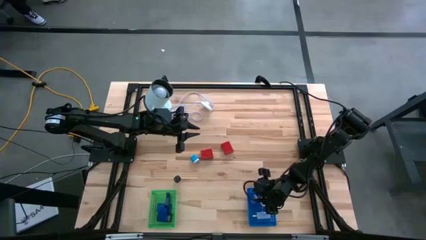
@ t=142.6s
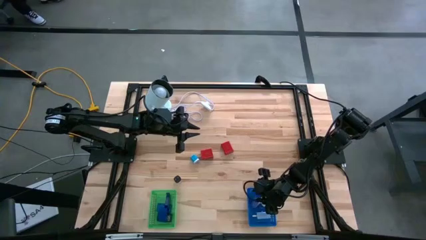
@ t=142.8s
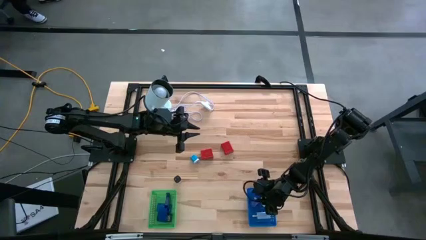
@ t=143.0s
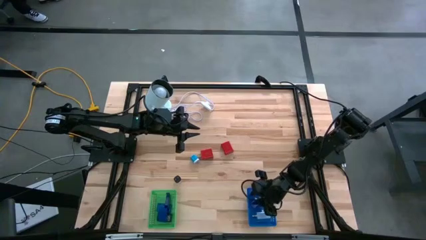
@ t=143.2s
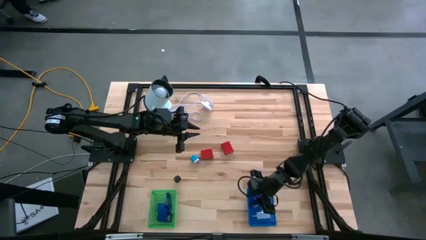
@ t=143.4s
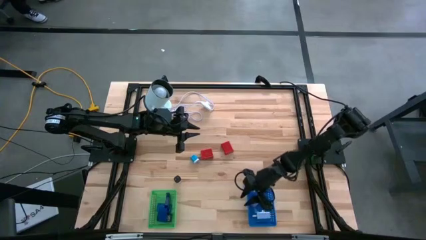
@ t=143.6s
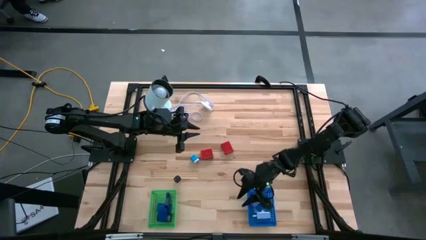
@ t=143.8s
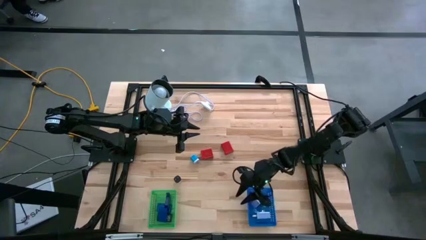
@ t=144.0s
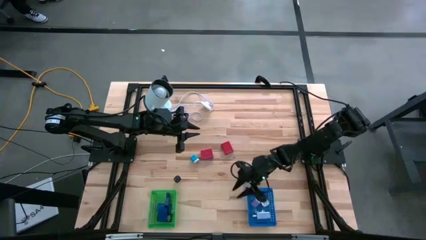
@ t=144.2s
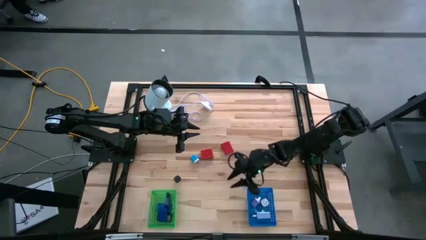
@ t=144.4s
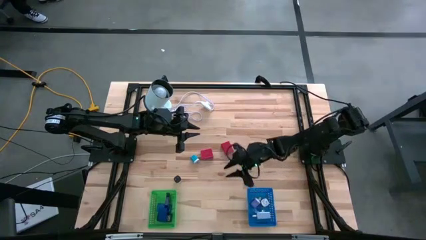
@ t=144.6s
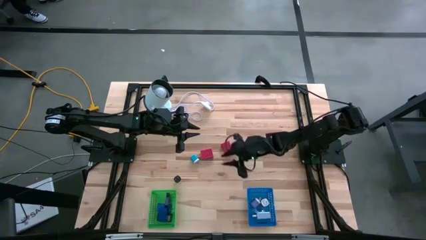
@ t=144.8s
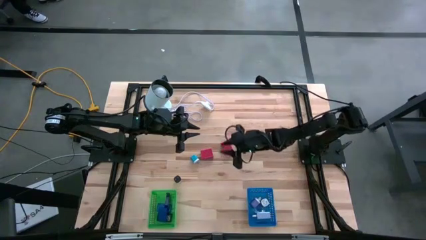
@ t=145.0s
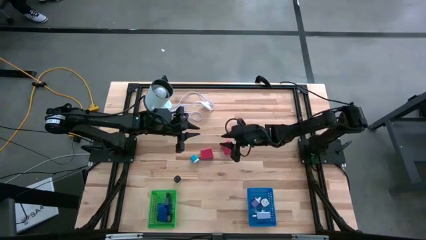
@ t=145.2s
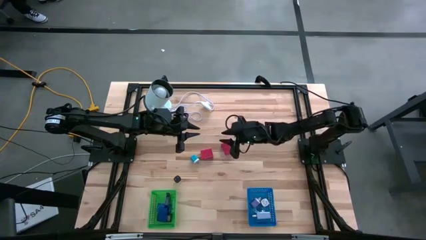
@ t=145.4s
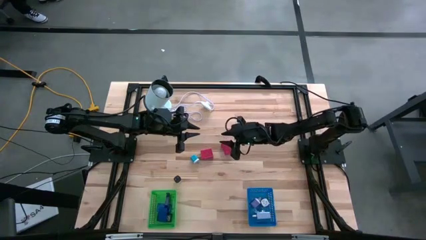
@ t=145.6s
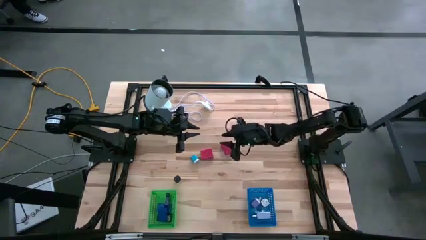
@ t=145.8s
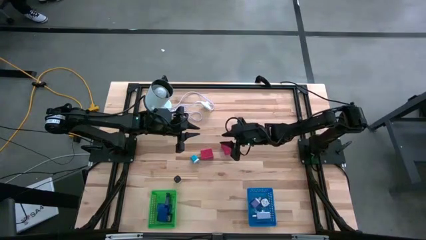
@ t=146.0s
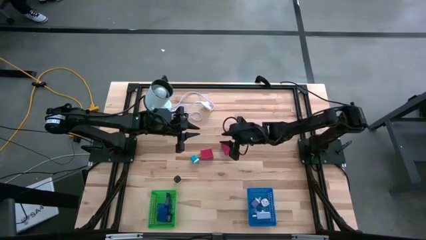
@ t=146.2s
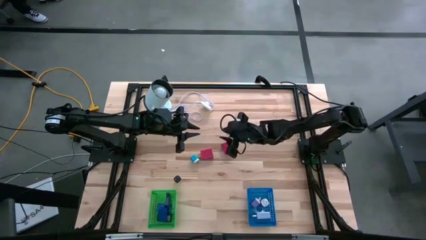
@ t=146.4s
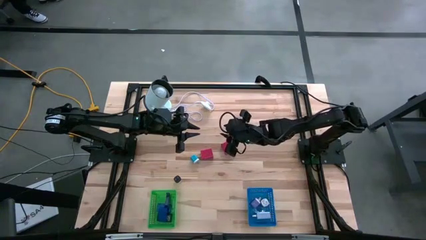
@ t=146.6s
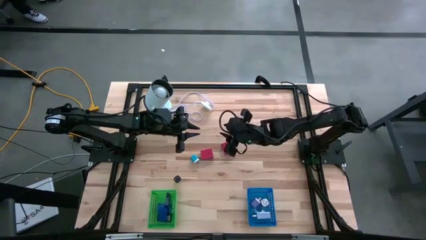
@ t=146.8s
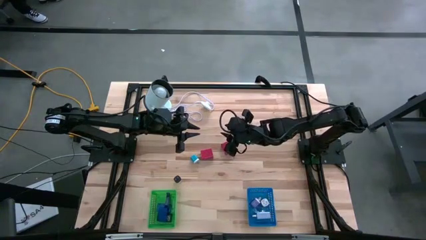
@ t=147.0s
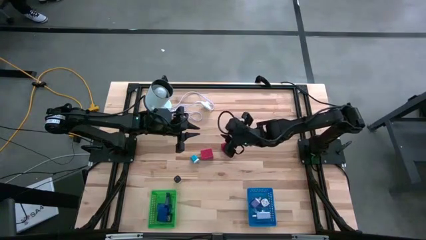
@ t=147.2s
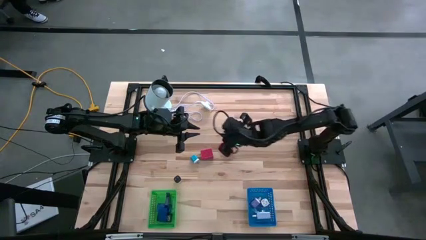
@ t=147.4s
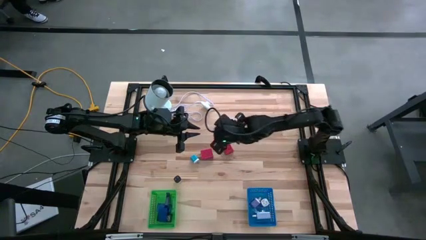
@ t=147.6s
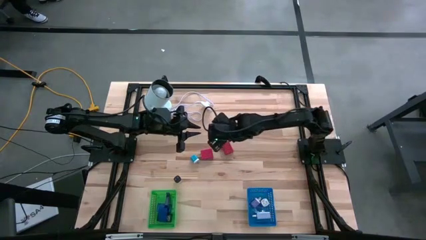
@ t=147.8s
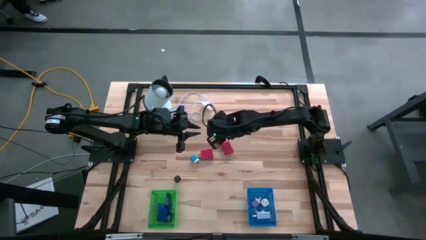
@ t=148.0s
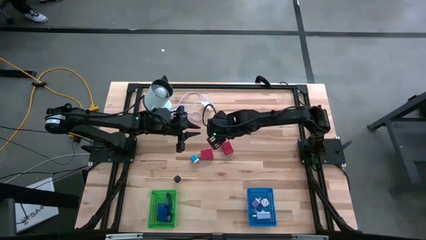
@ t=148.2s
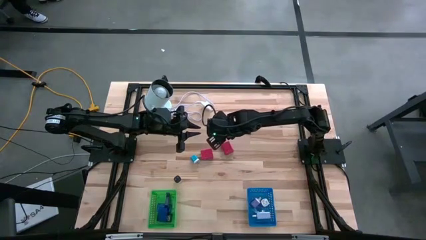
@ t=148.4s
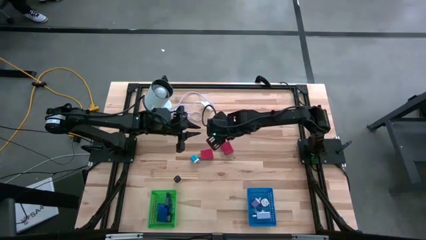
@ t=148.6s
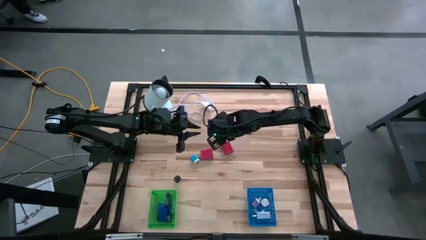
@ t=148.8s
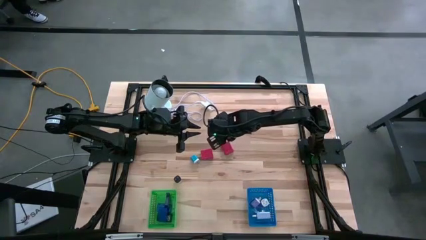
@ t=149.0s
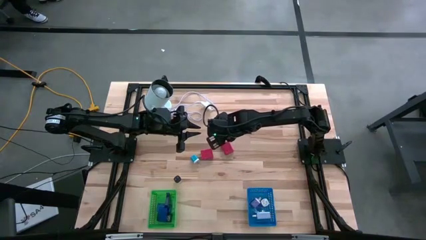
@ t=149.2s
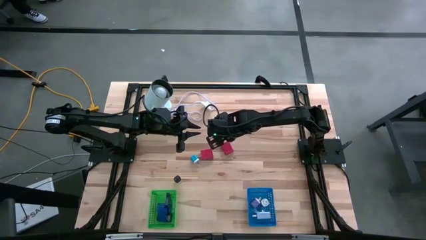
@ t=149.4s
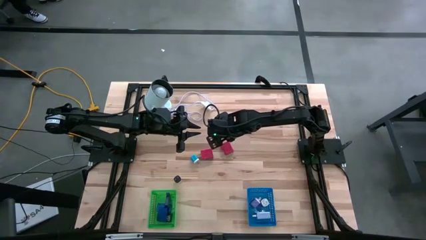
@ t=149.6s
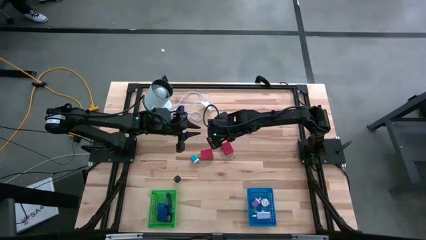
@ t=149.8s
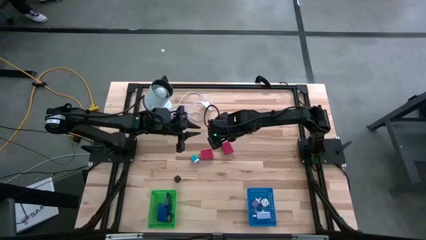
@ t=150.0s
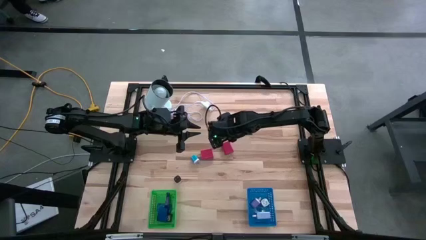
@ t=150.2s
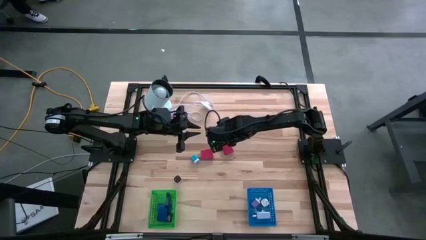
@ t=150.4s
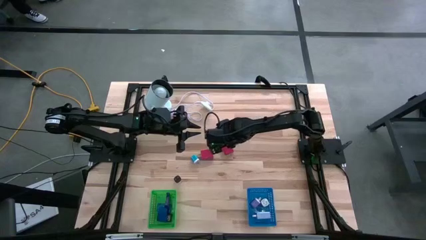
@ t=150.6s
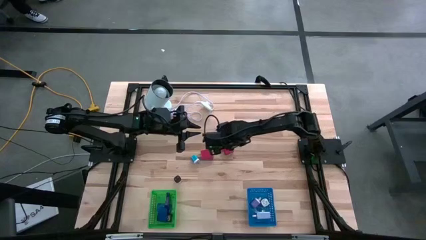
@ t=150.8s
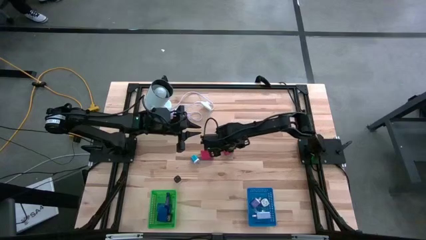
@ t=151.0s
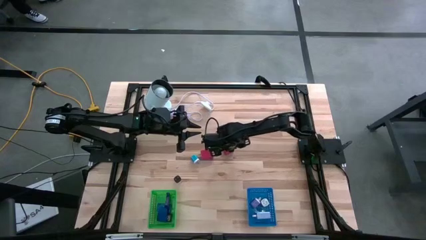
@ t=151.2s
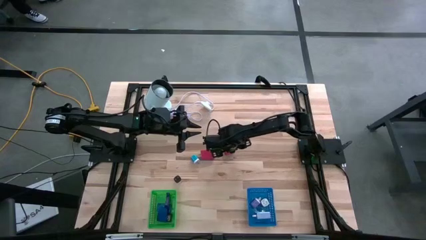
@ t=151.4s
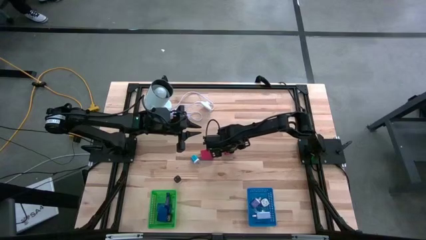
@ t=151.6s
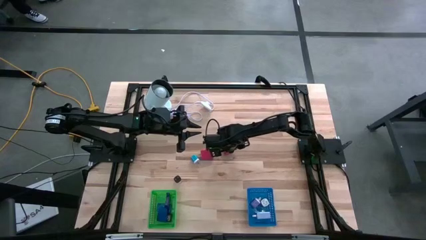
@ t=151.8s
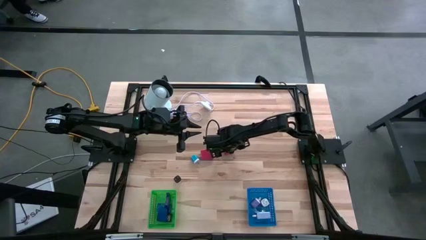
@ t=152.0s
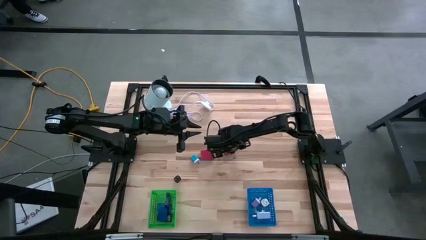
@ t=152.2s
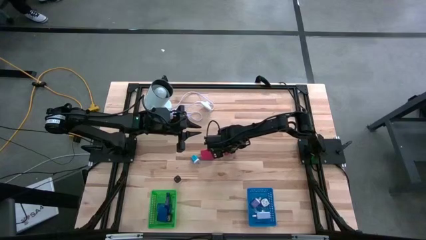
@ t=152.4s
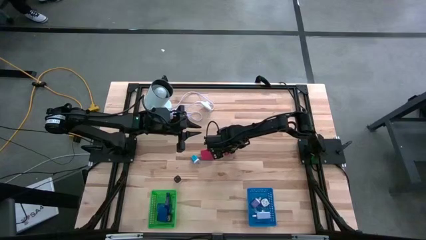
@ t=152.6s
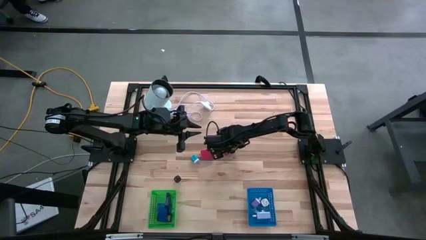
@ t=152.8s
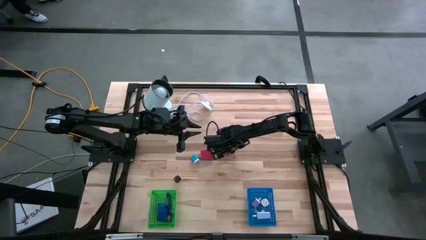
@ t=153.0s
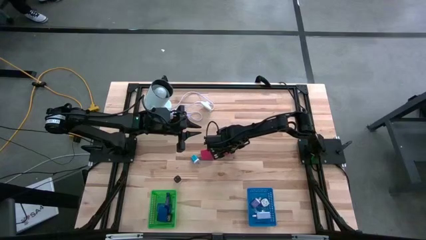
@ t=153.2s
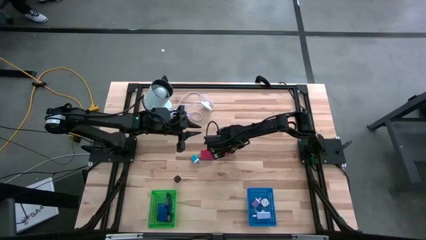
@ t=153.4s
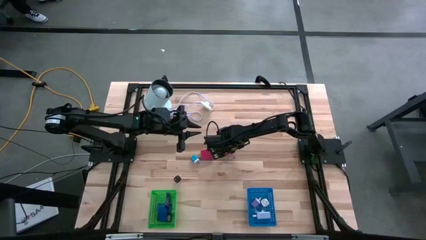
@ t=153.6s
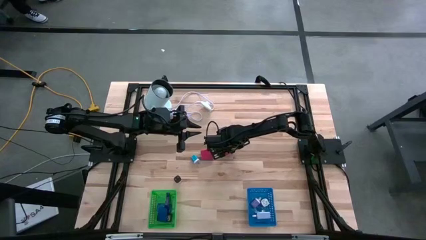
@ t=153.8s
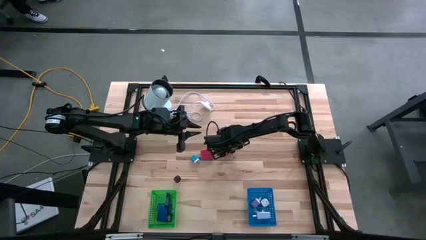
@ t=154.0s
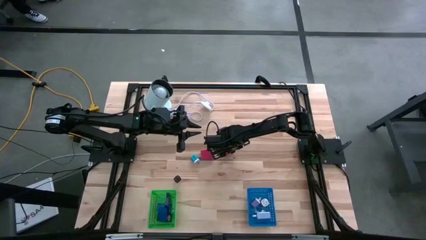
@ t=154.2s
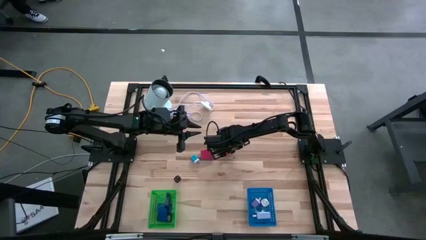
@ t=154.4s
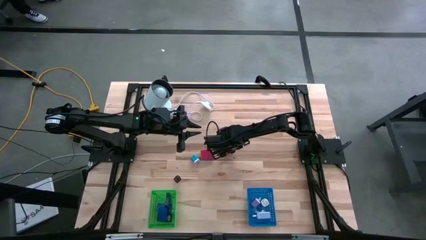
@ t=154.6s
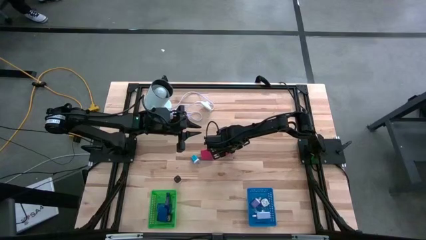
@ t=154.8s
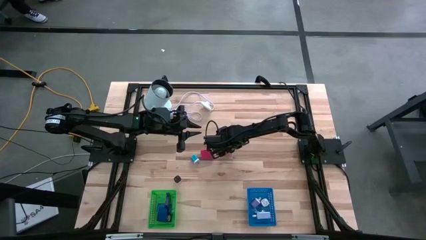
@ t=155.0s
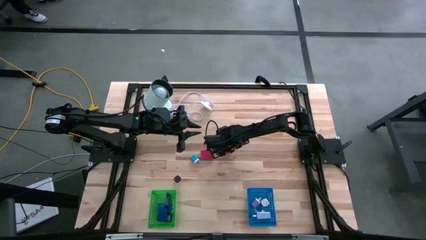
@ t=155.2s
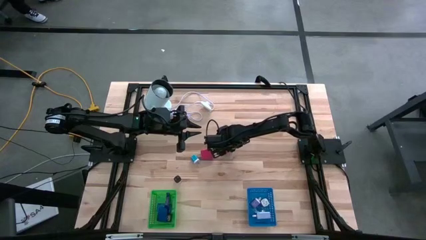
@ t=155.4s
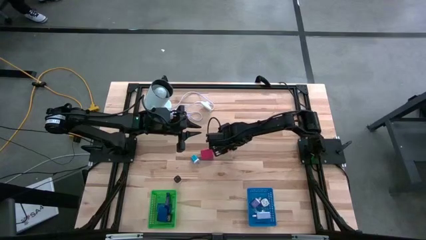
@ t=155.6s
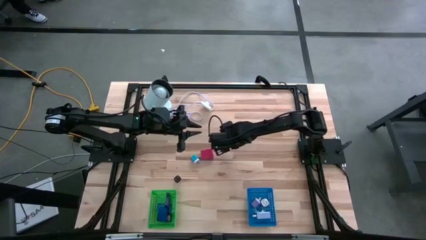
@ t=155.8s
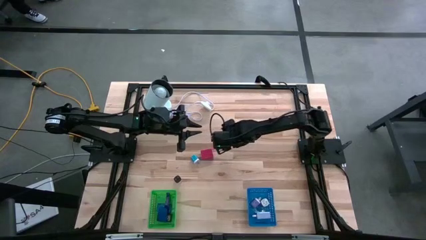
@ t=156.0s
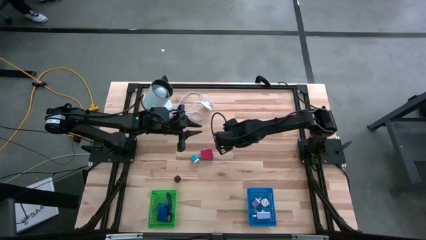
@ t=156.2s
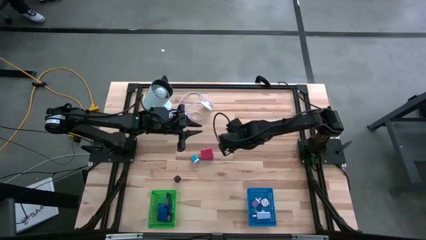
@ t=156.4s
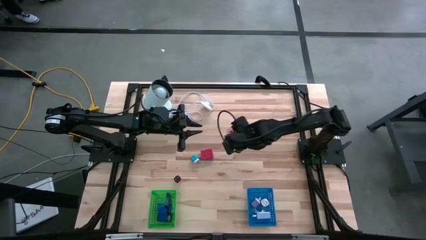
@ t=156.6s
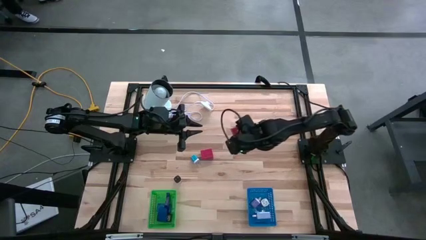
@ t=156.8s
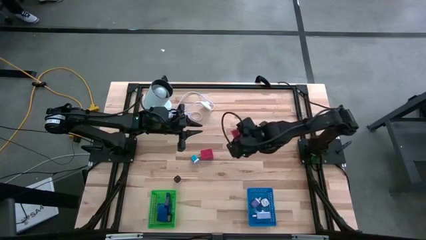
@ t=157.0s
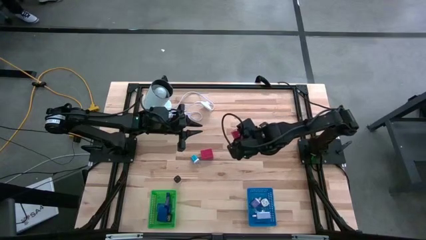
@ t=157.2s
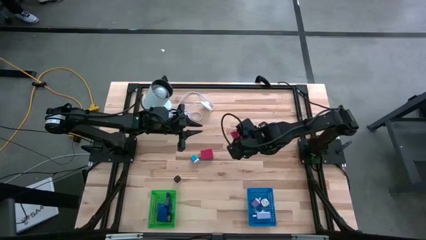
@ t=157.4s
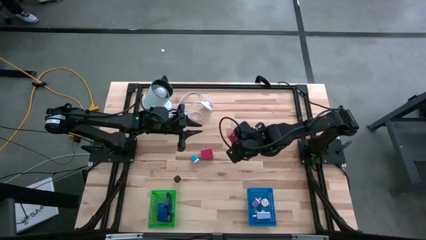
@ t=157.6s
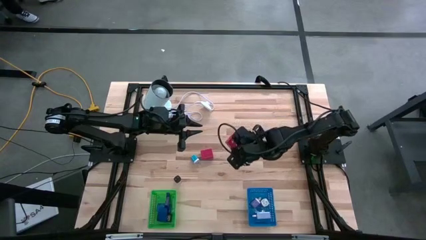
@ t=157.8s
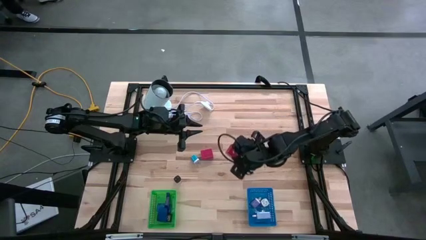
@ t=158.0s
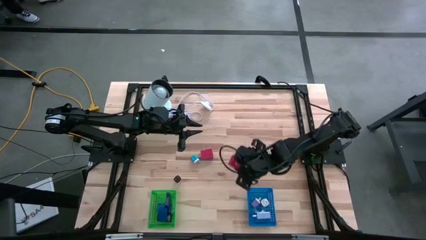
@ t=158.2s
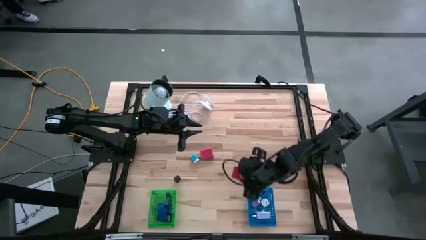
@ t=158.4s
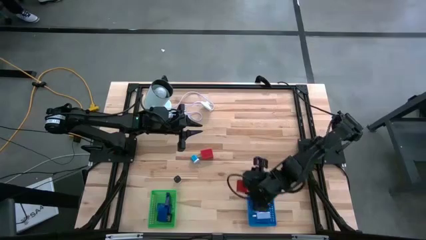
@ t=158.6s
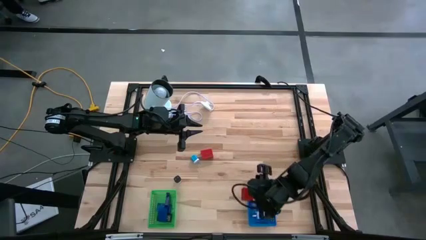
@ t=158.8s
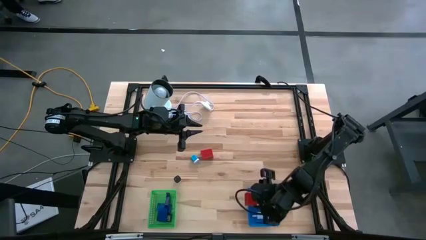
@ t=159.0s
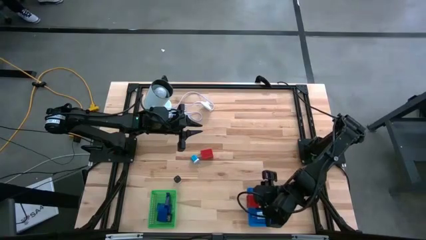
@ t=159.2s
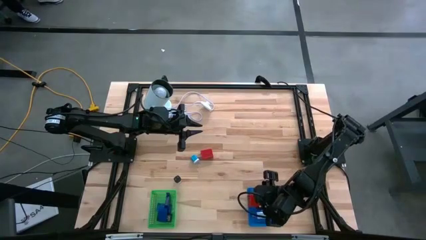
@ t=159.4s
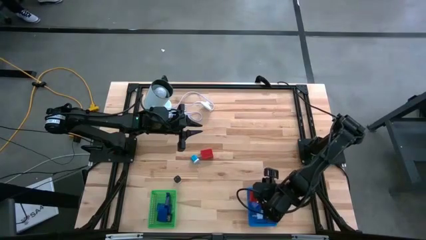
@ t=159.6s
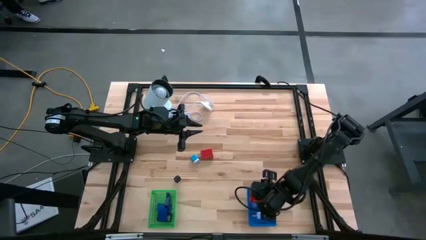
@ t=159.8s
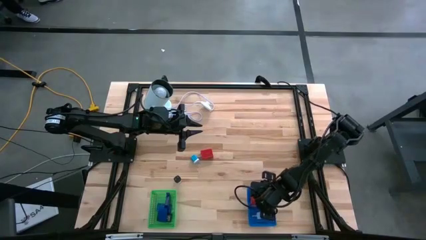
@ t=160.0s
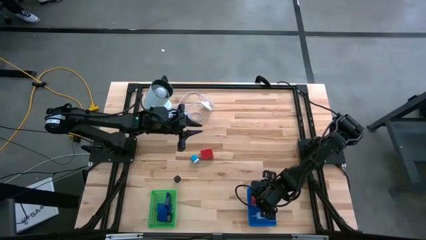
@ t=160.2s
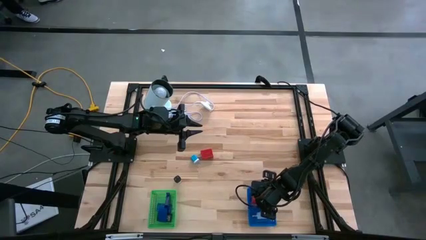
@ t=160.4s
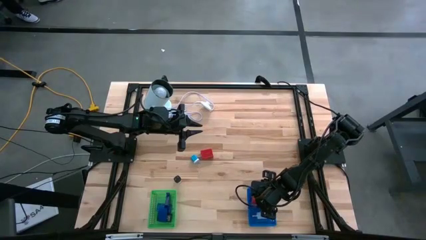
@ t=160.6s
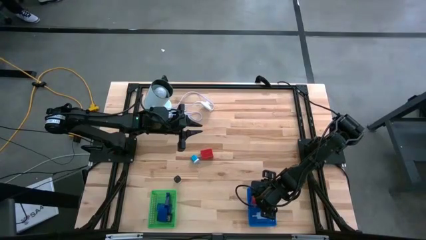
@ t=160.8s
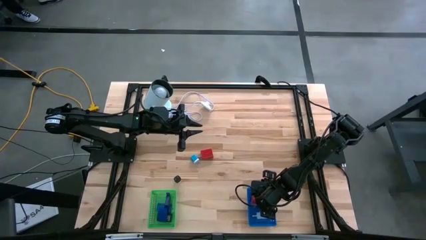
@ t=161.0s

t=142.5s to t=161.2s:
Task: Pick & Place Office items
Put the right red charger adapter into the blue bin
